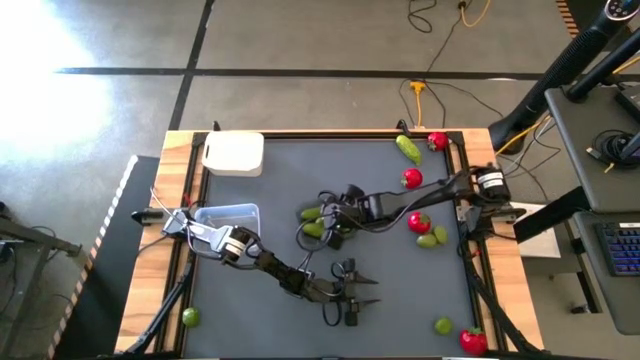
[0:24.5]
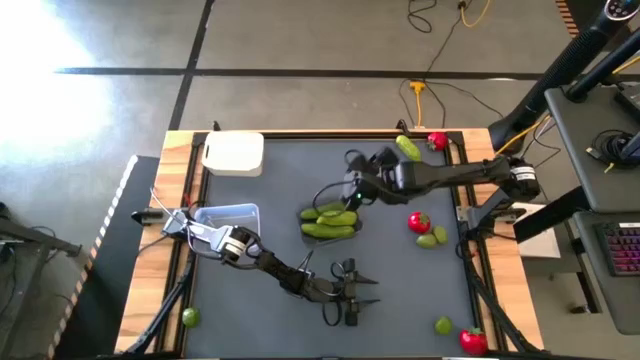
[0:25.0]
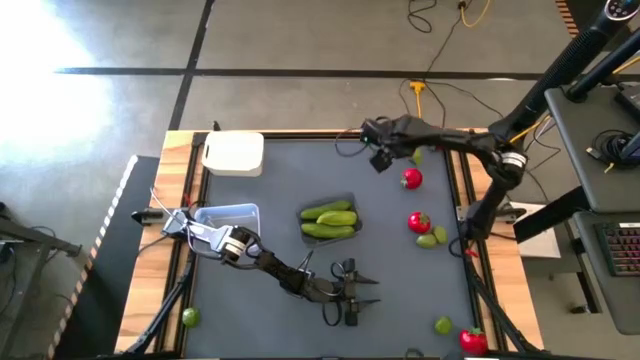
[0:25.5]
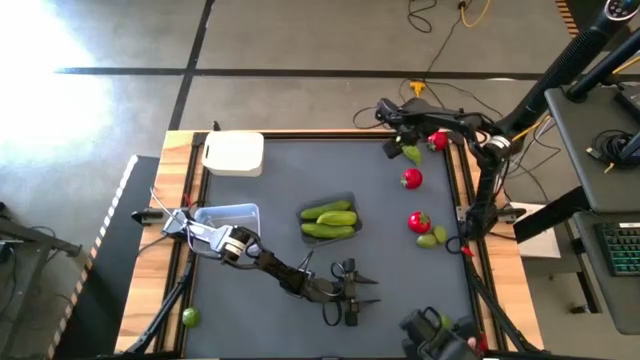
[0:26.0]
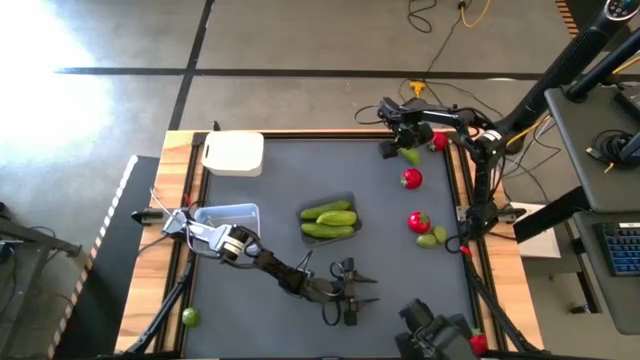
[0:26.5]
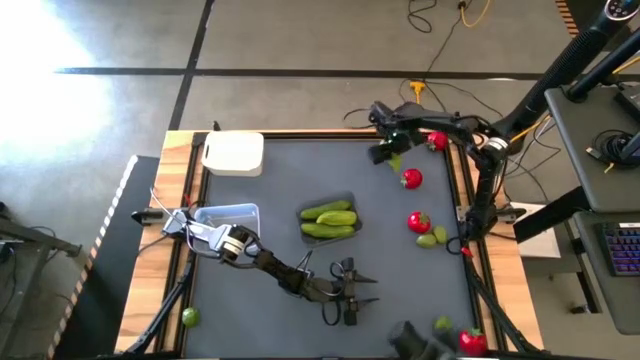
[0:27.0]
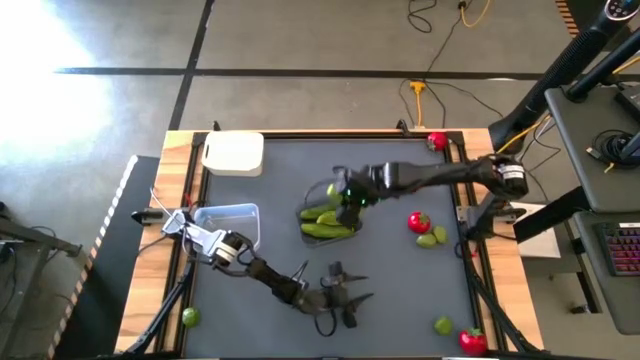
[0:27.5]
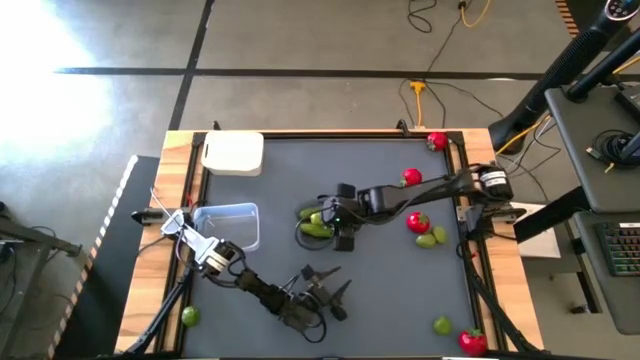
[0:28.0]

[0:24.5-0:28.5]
Task: Sort produce into baskets
Put the green cucumber into the black bin

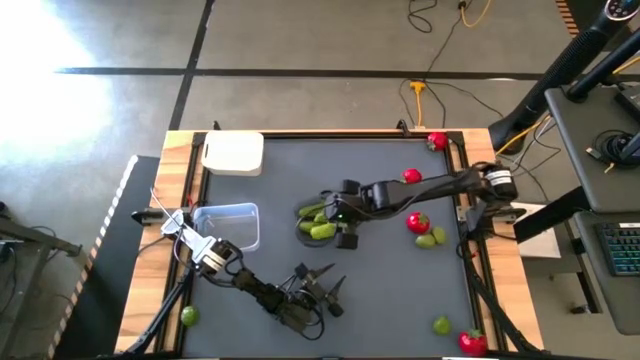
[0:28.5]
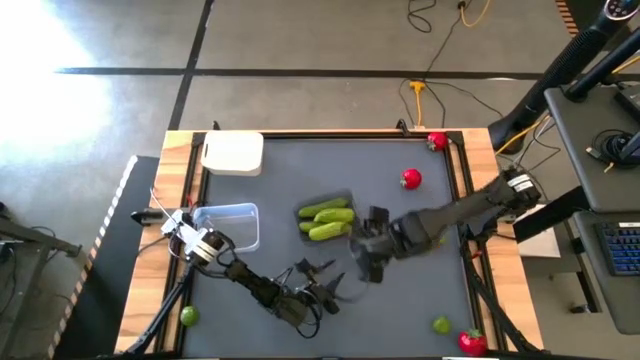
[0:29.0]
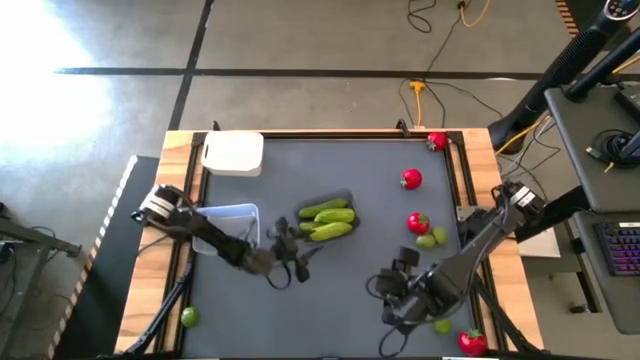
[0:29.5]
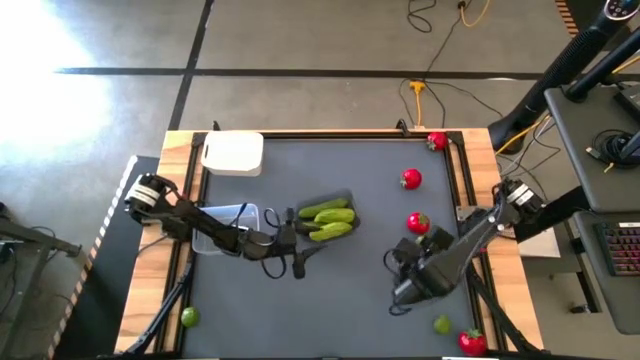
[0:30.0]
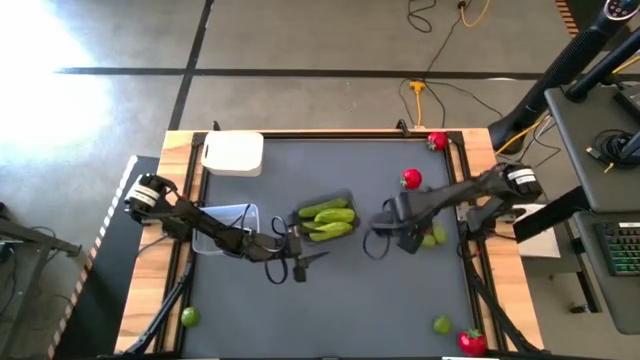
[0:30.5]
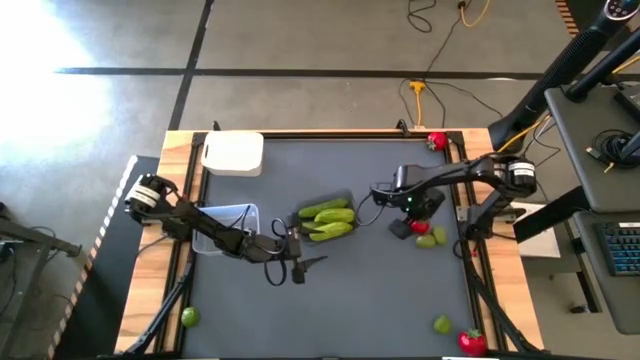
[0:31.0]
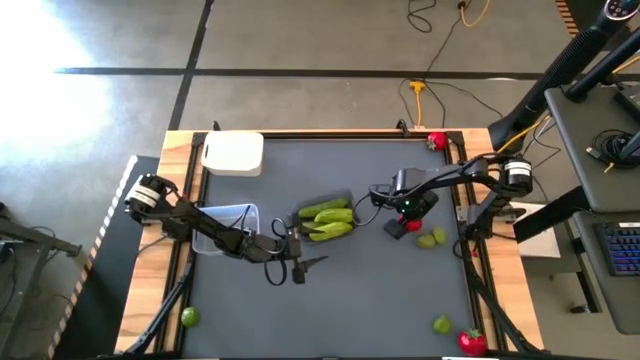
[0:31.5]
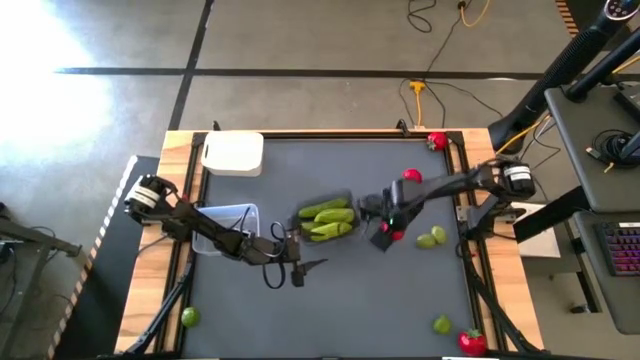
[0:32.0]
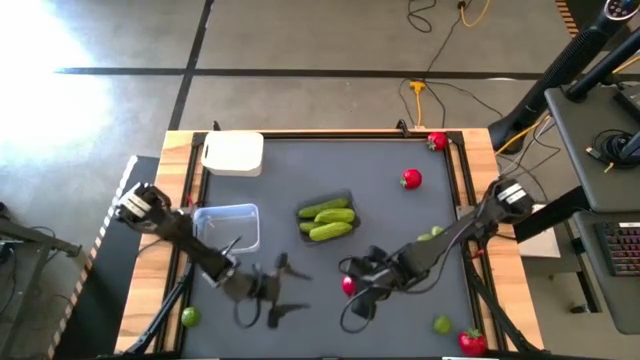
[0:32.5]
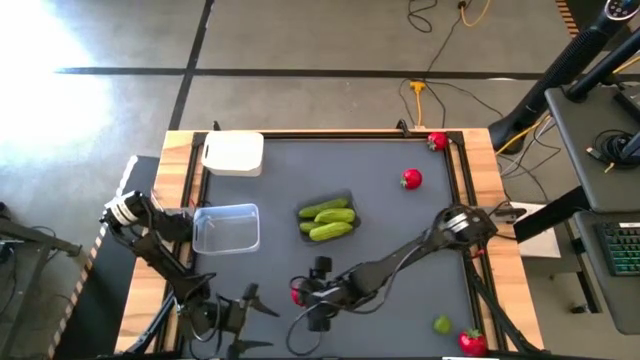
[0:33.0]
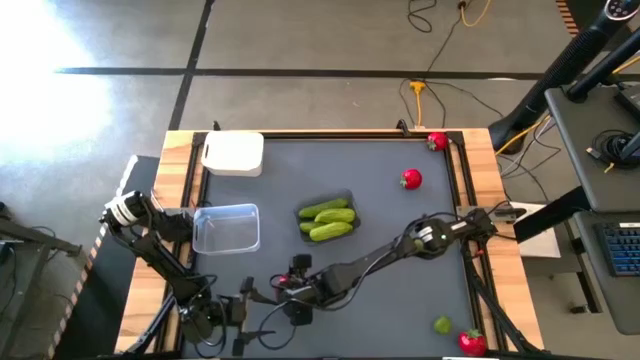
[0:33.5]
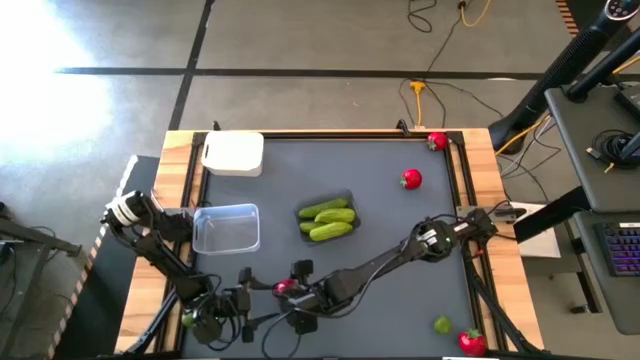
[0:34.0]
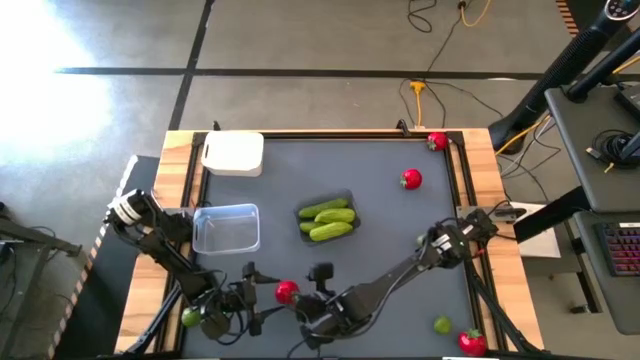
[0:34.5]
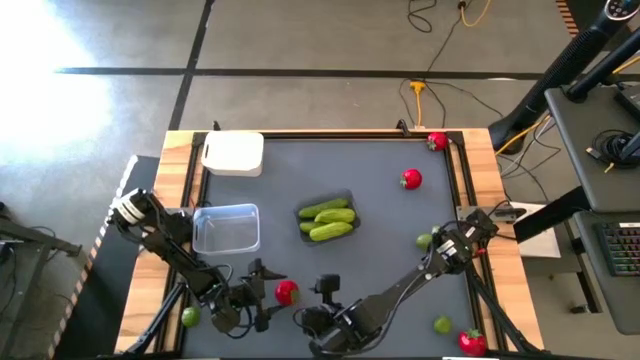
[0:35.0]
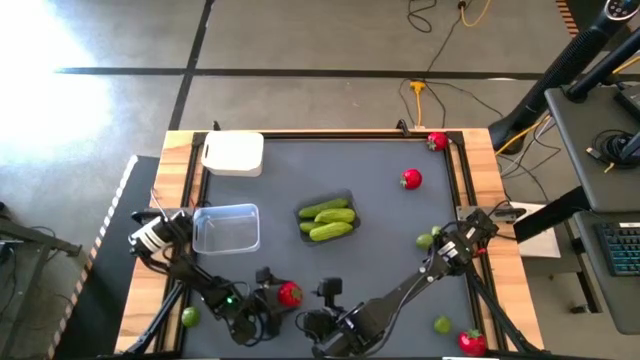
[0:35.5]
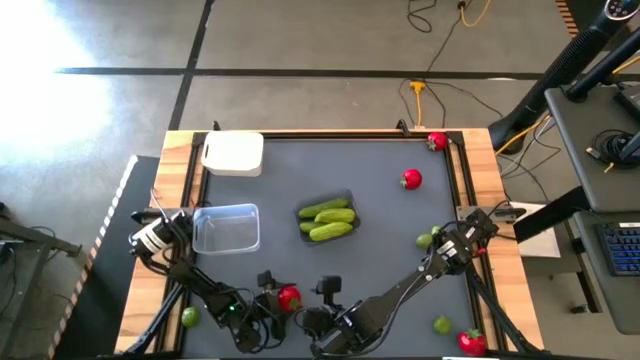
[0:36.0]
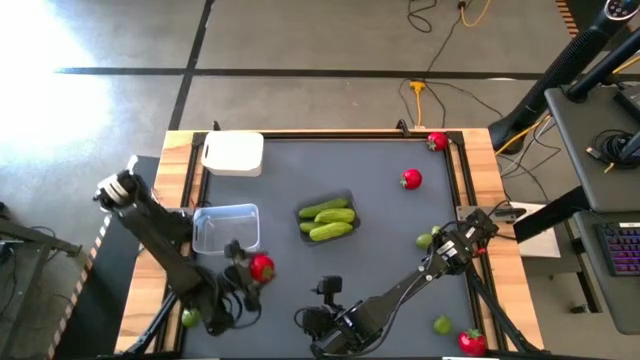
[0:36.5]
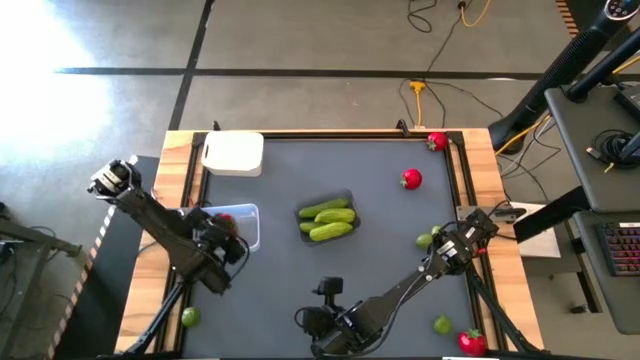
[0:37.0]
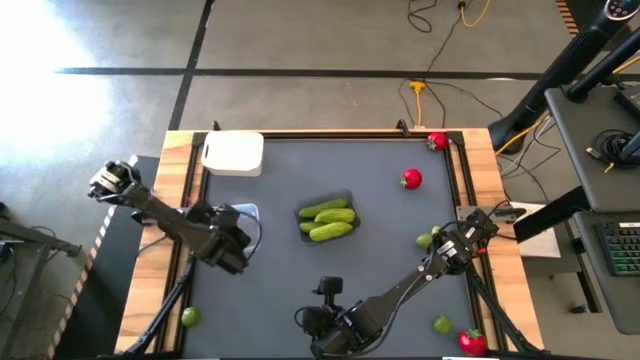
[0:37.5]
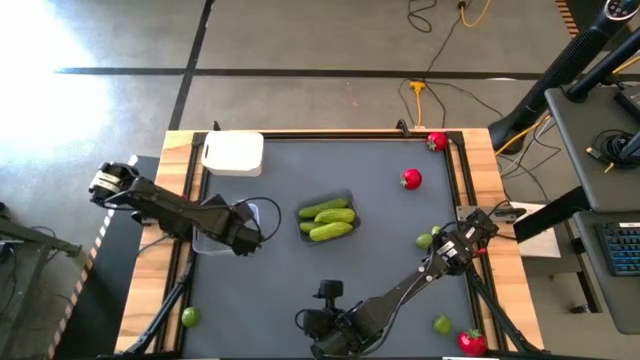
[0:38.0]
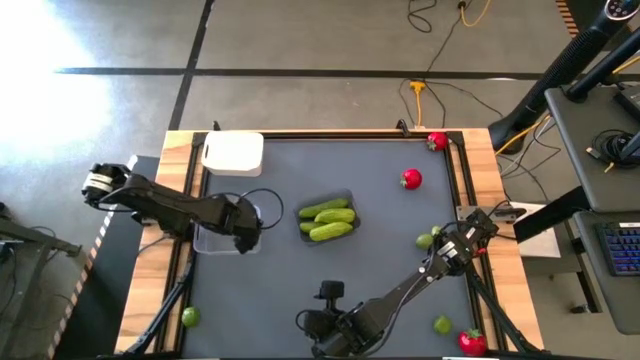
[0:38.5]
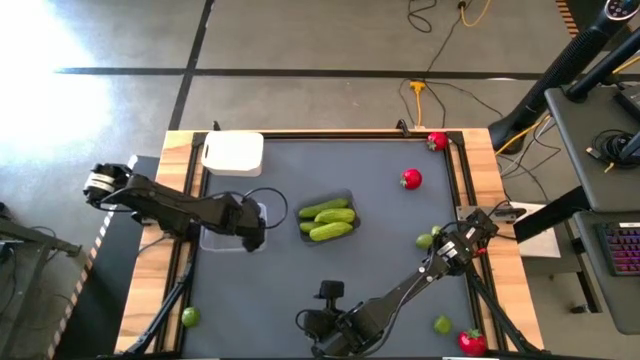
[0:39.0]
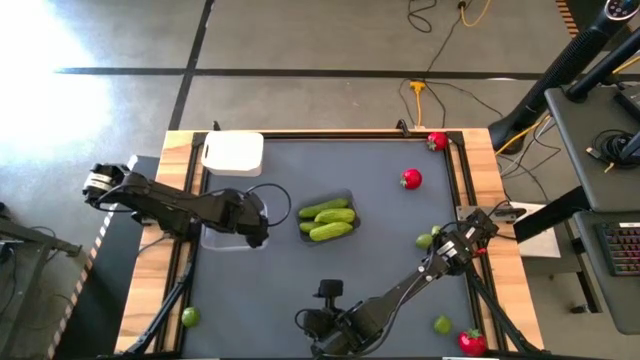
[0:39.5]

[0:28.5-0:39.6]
Put the tomato into the transparent bin

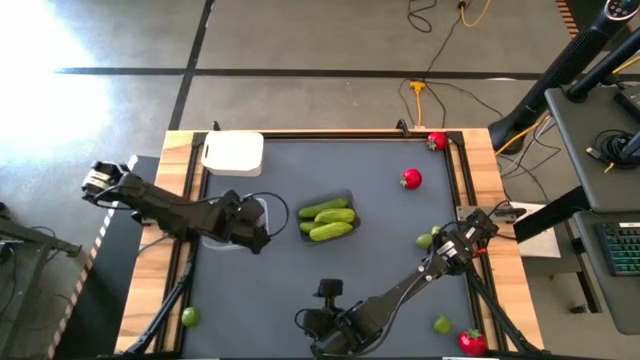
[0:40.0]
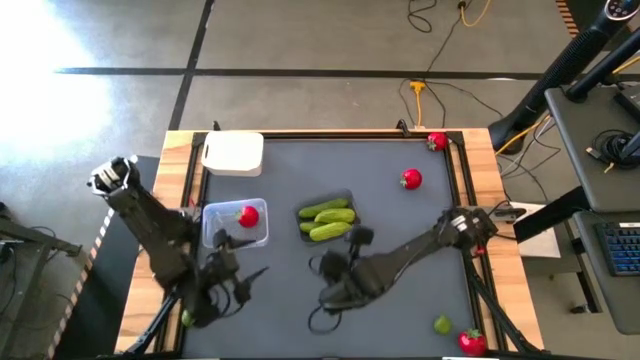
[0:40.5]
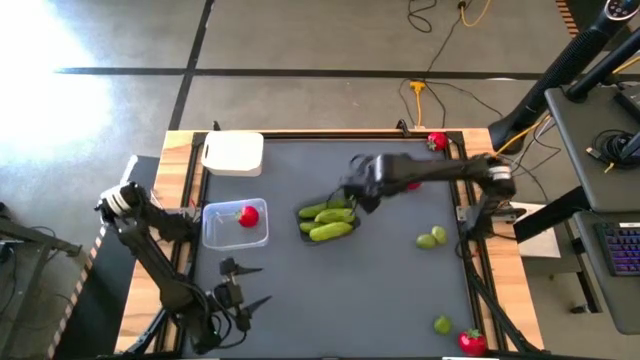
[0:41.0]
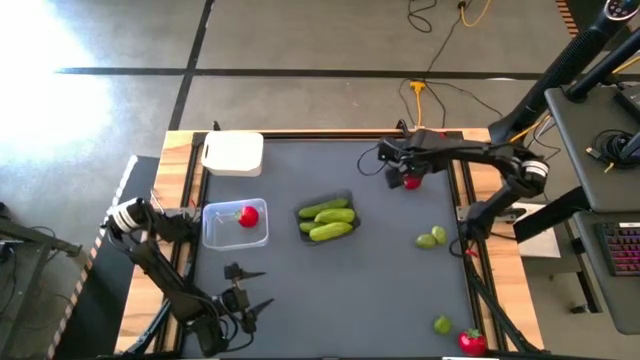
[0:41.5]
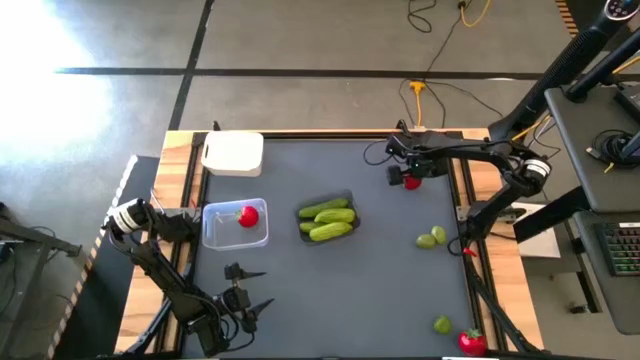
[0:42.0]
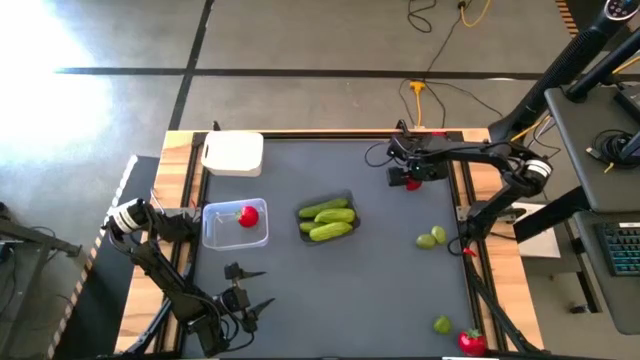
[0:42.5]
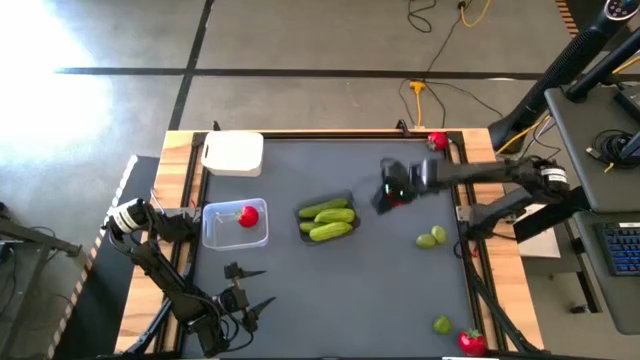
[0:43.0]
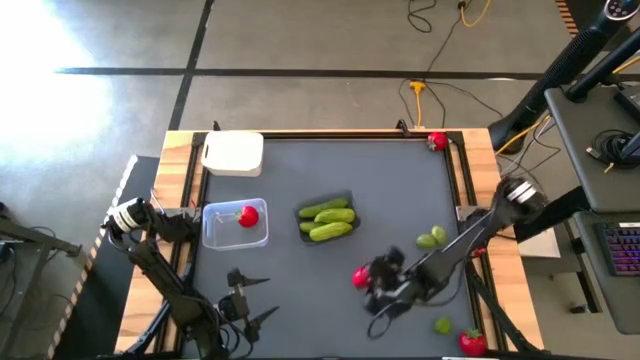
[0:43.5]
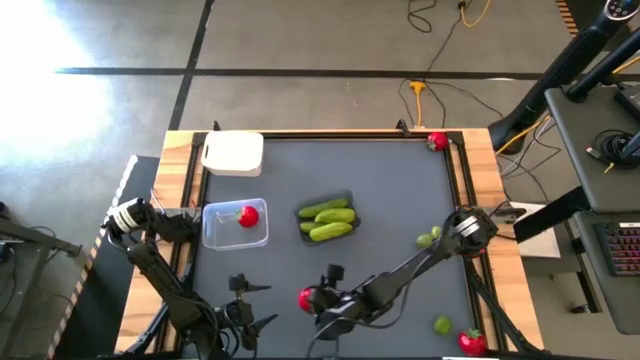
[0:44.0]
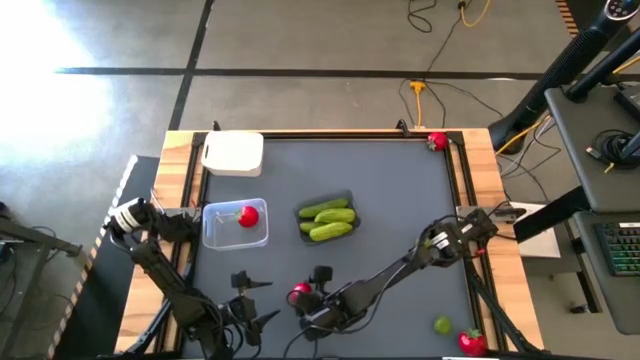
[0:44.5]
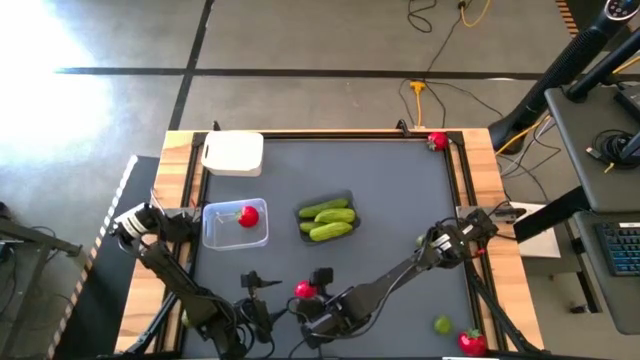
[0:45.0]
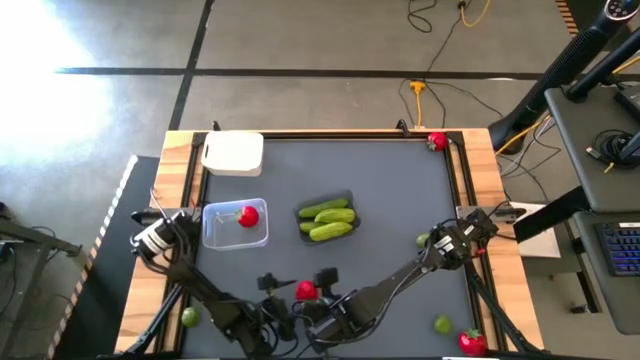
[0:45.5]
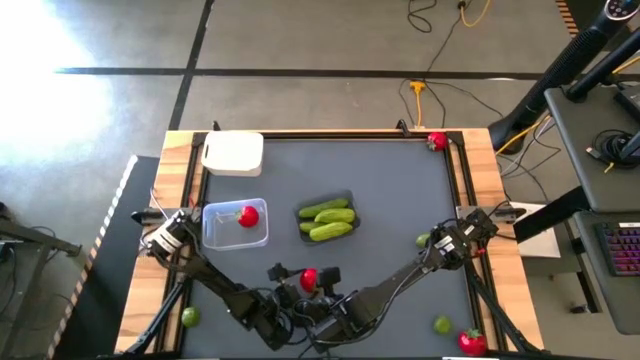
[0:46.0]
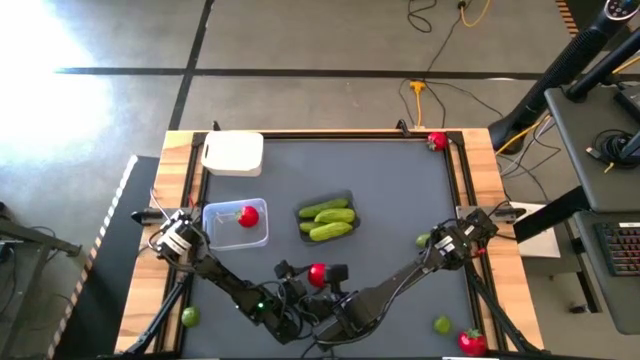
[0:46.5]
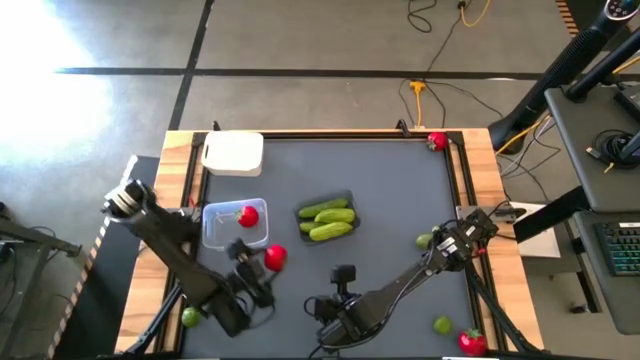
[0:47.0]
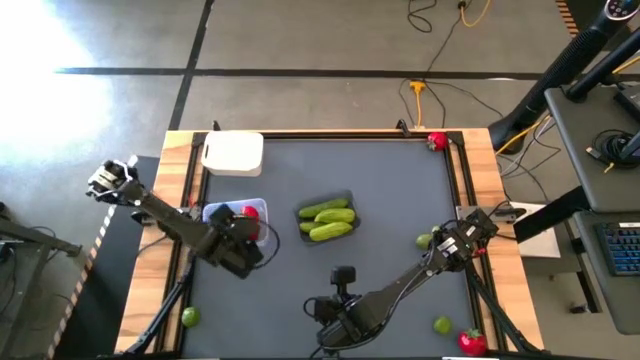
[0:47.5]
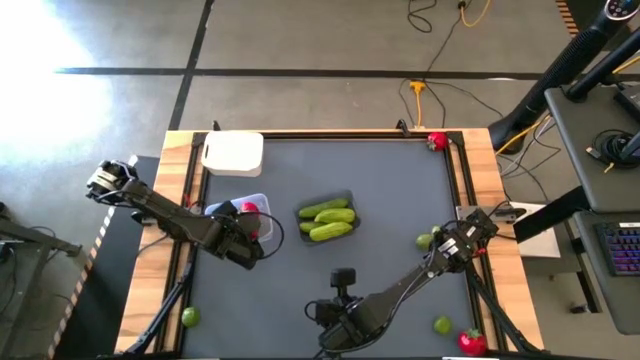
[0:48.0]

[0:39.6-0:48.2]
Put the tomato into the transparent bin
